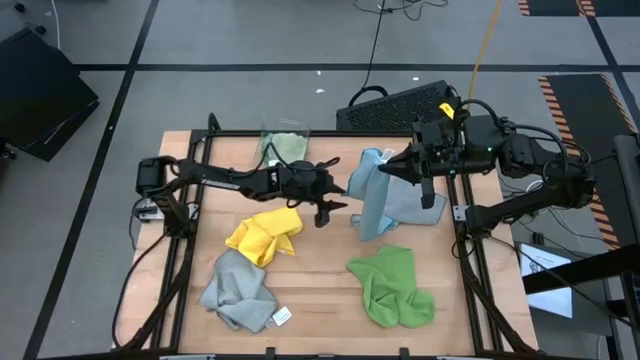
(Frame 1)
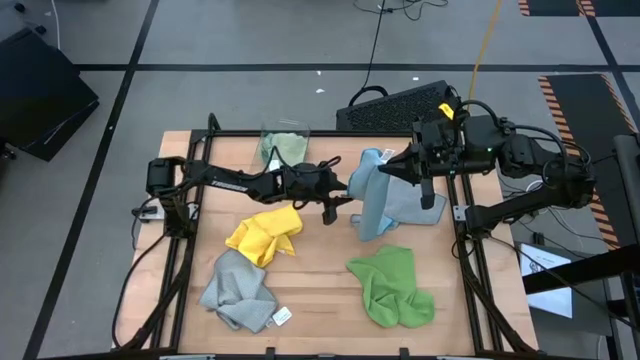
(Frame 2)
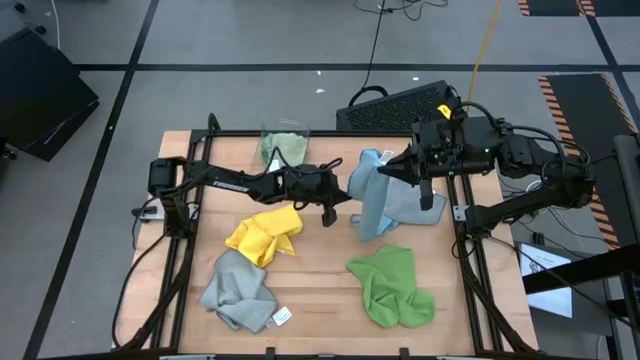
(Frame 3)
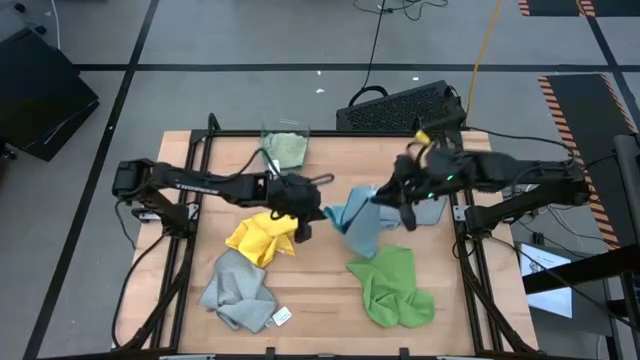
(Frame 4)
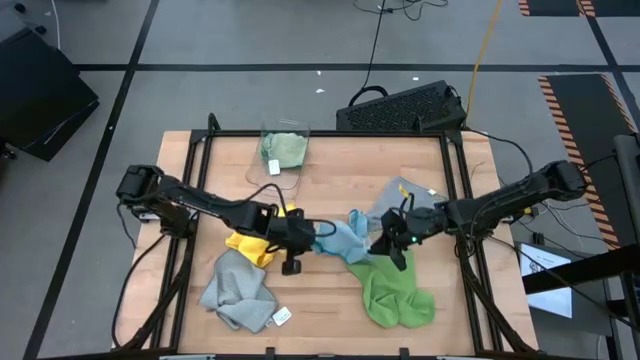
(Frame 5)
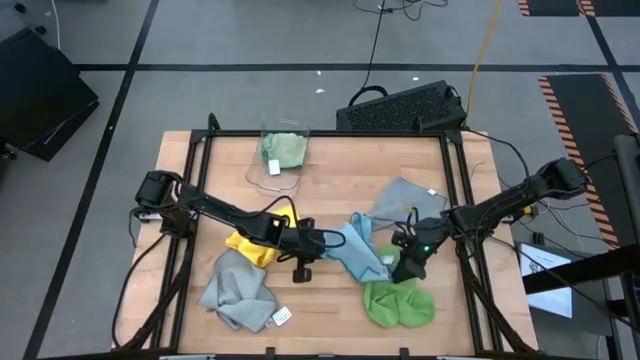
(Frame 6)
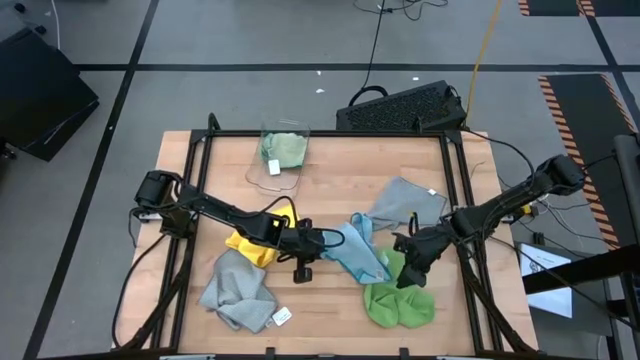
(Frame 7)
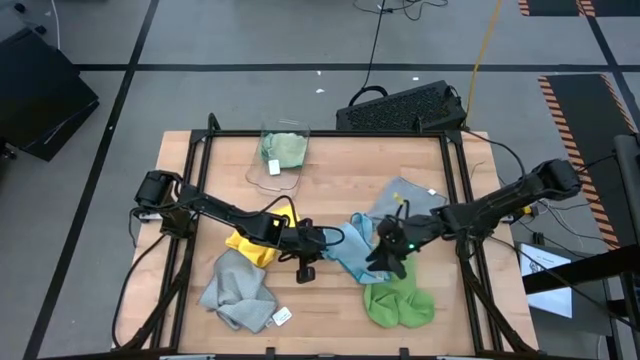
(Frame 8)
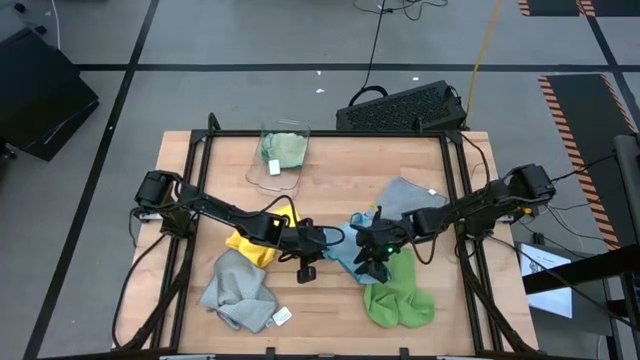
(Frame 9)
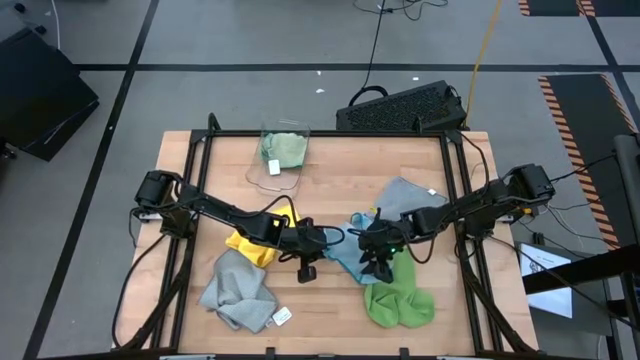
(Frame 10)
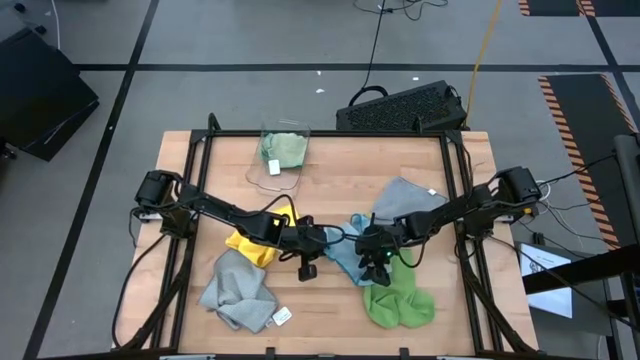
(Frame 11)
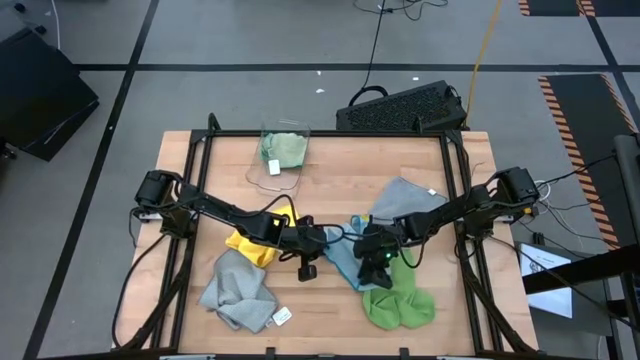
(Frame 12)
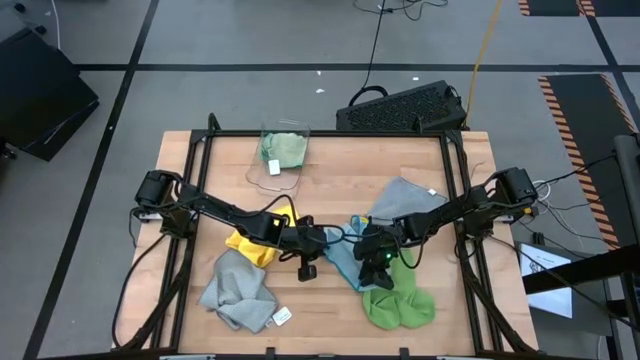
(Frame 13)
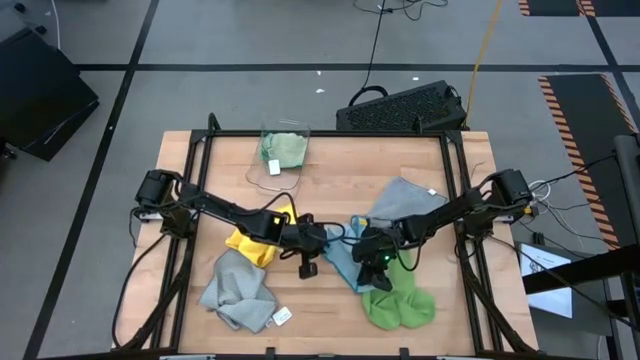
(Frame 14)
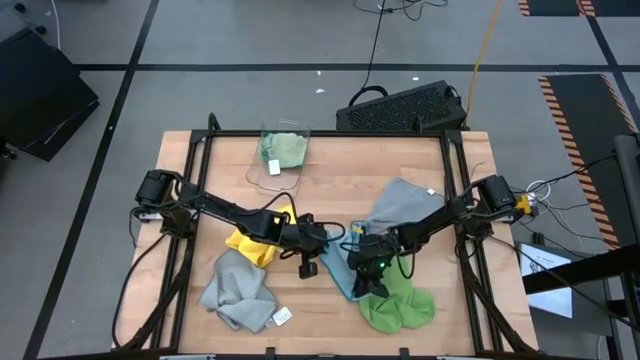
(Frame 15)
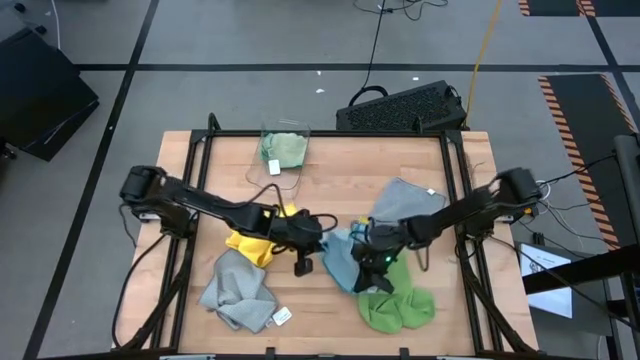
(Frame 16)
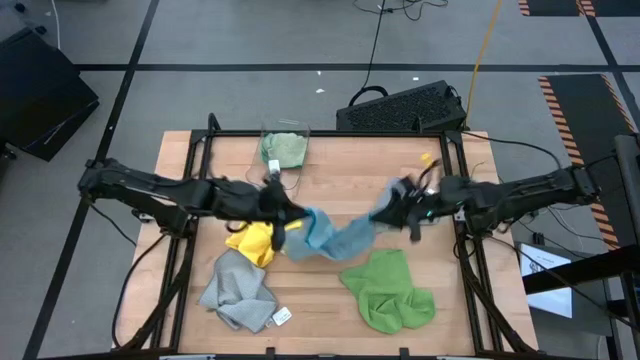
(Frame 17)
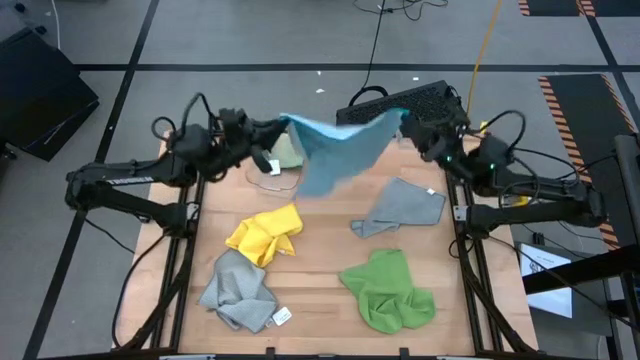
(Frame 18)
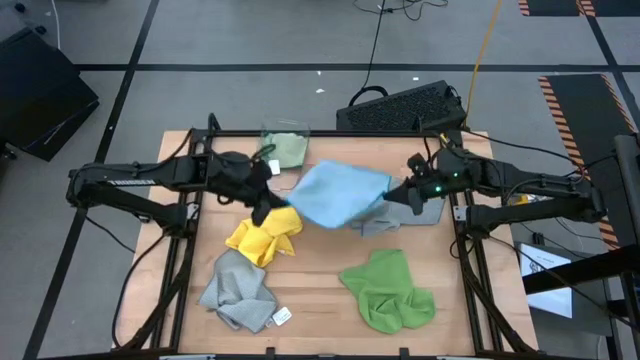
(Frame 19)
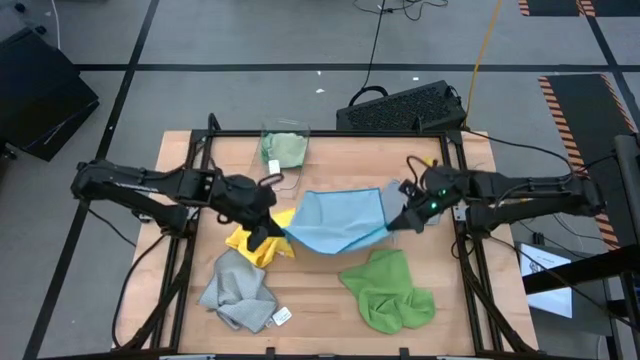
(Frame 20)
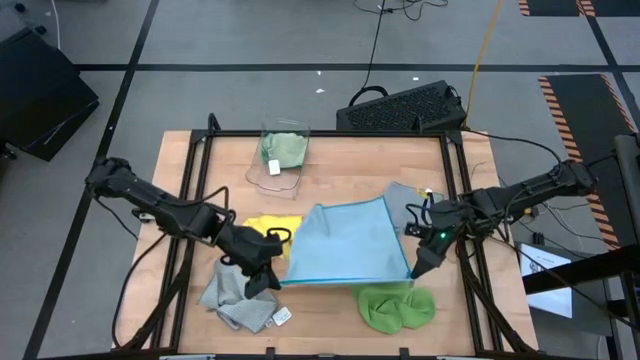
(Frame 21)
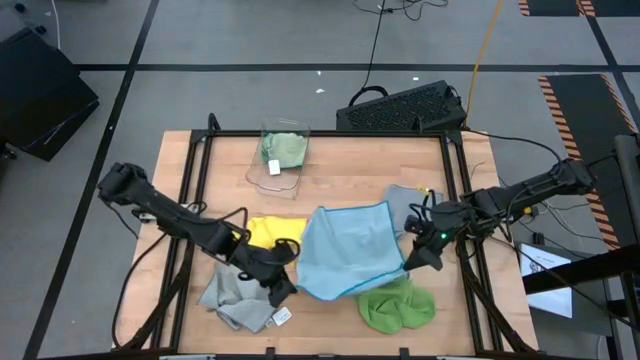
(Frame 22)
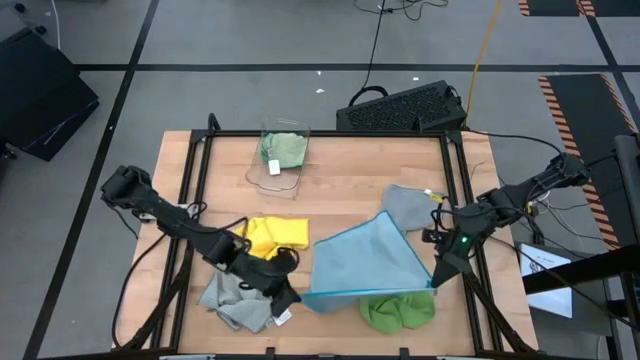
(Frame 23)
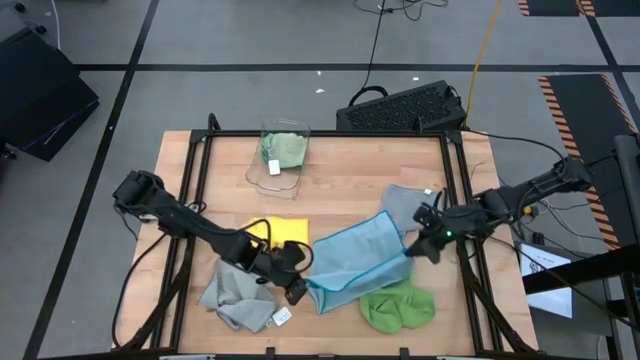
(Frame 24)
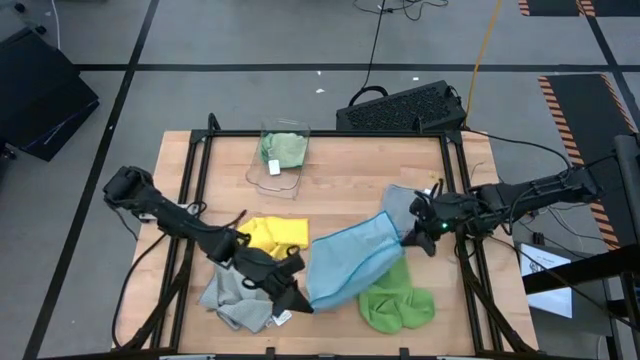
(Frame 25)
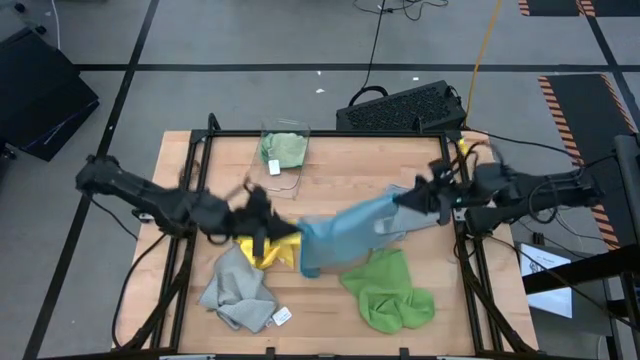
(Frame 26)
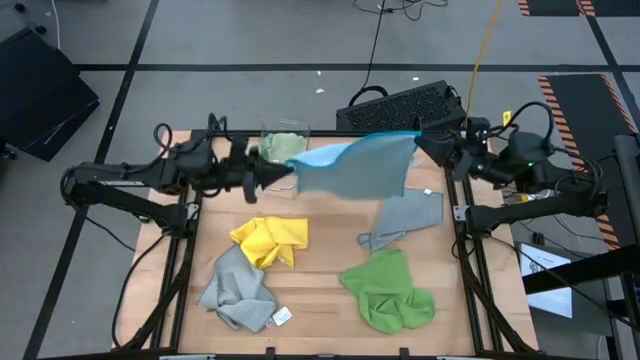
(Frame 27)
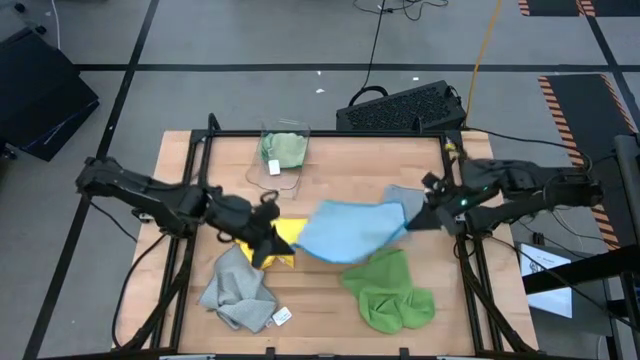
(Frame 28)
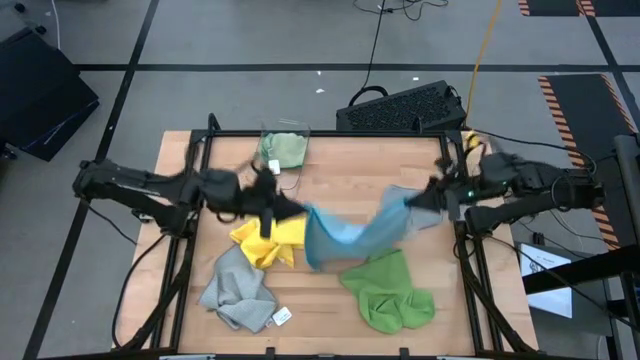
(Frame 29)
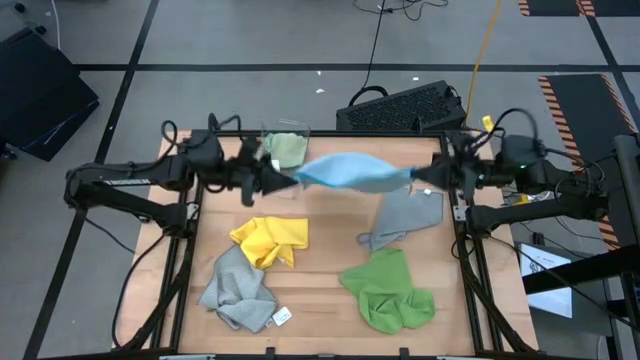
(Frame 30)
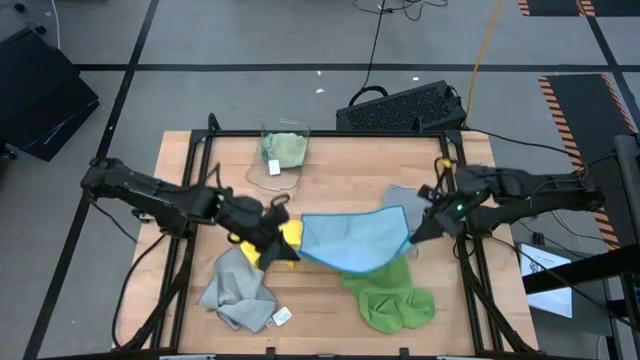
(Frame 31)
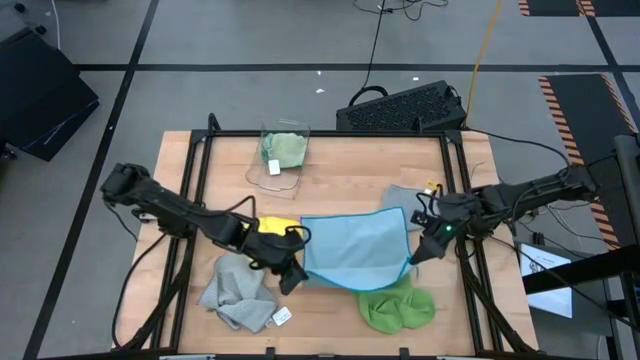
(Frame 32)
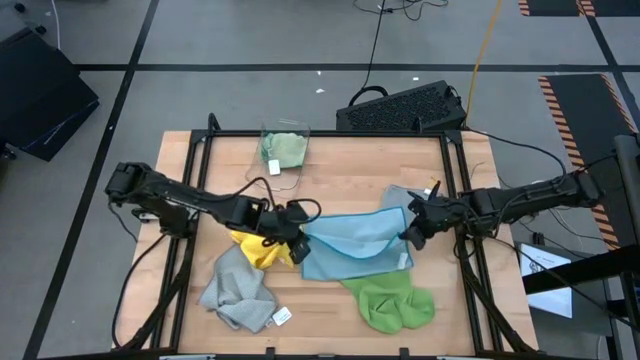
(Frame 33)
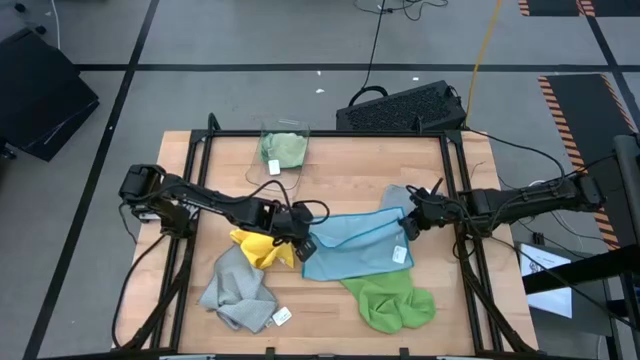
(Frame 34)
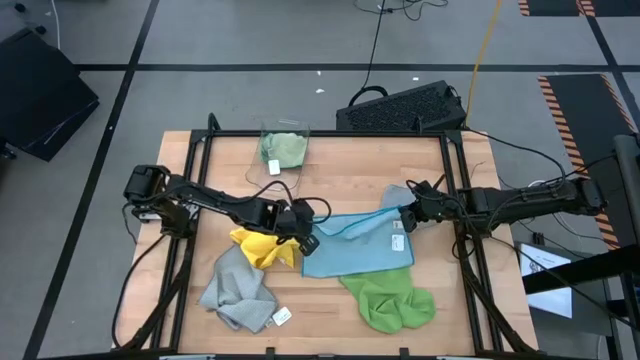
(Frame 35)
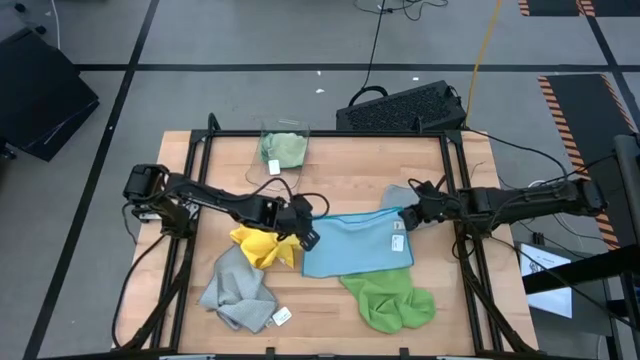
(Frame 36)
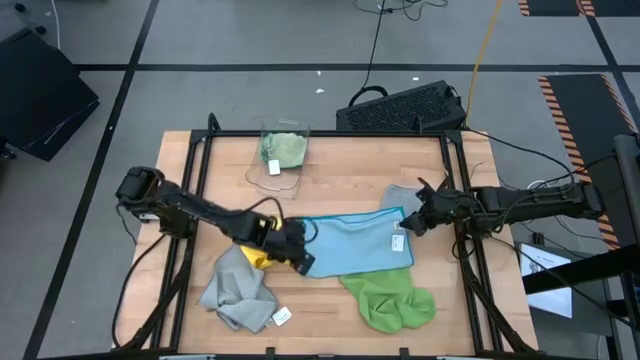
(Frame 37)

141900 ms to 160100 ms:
Task: Fold microfiber towels
Fold the blue microfiber cloth

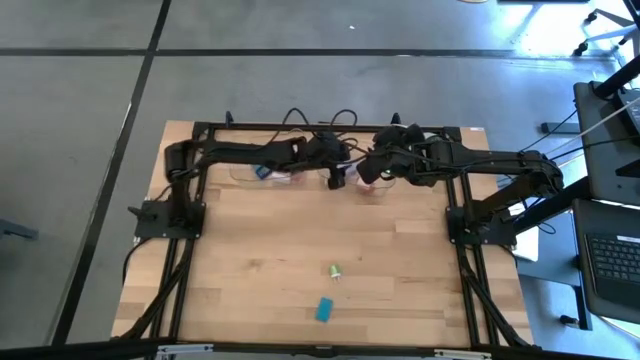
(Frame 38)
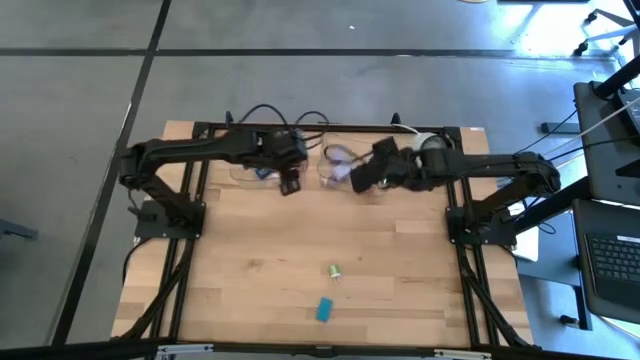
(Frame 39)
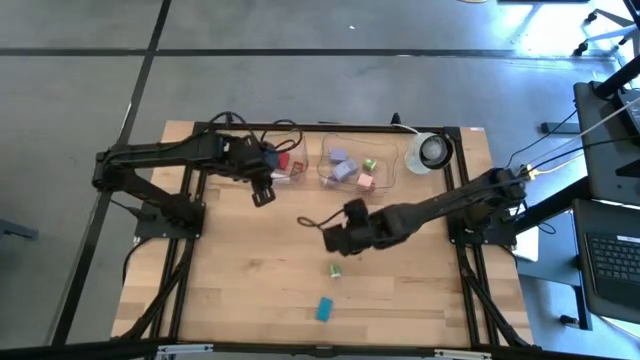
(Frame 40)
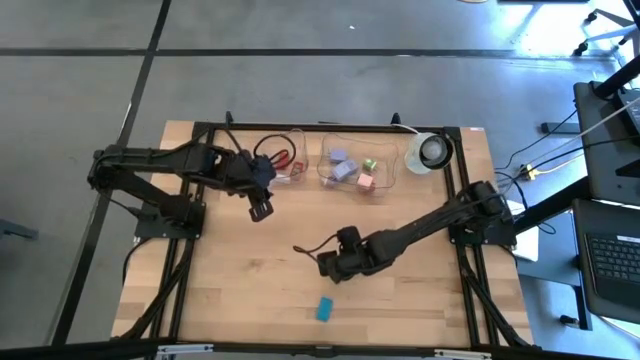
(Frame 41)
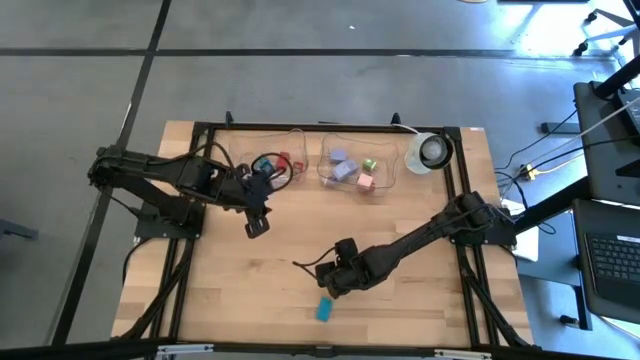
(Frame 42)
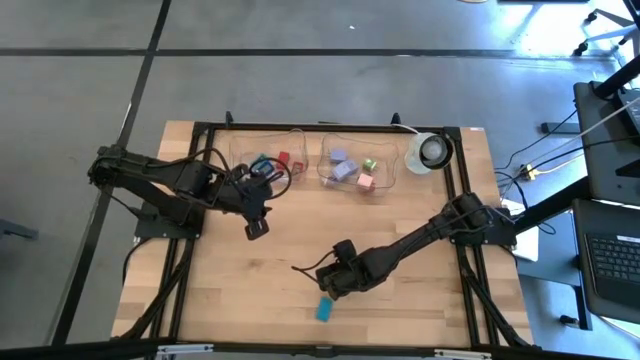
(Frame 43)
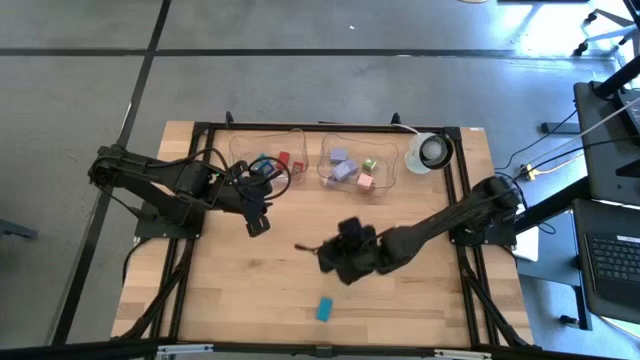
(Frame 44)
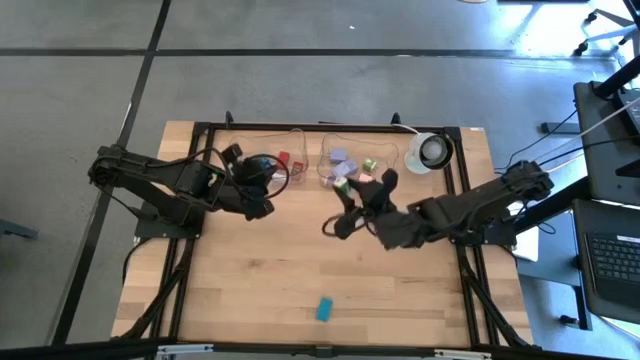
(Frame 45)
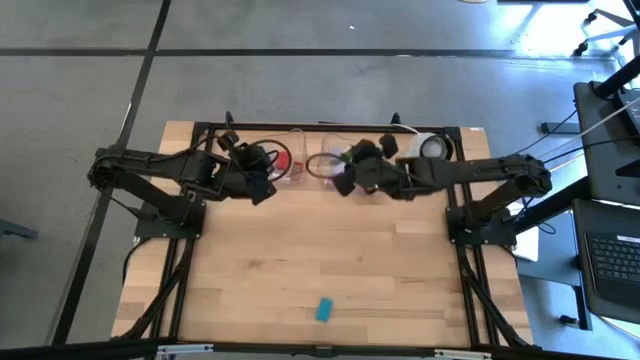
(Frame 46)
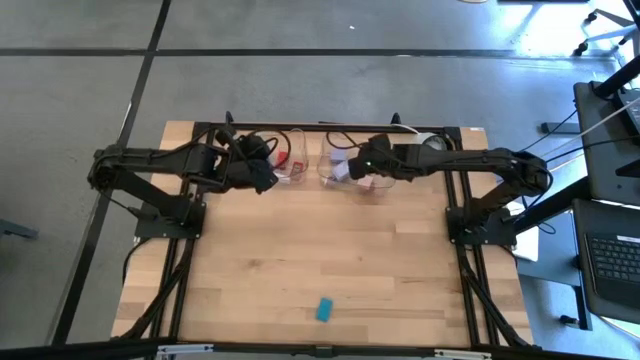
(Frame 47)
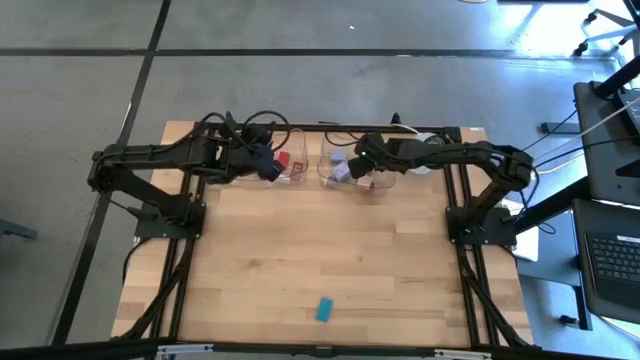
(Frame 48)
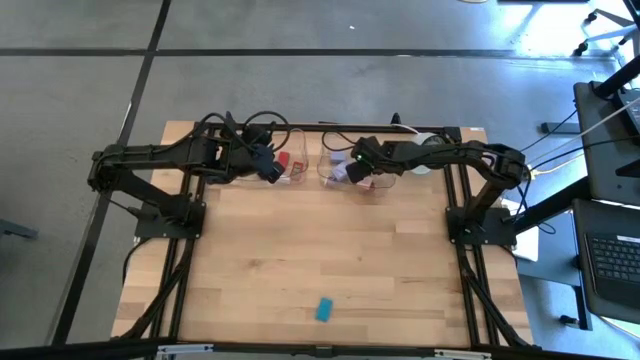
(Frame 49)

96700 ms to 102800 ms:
Task: Pick & Place Office items
Put the green charger adapter into the right transparent bin
